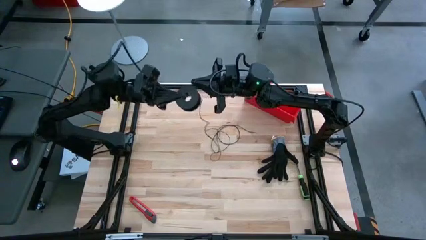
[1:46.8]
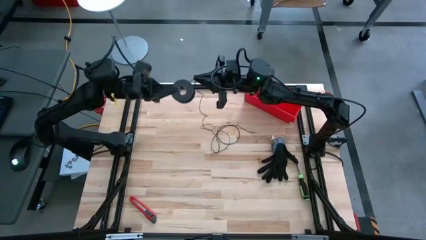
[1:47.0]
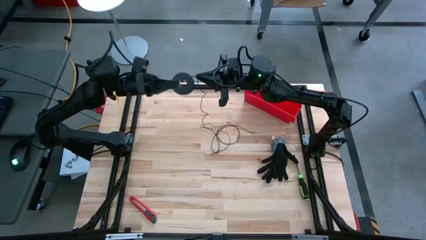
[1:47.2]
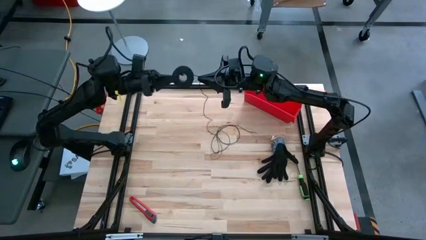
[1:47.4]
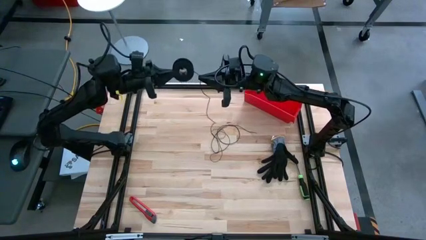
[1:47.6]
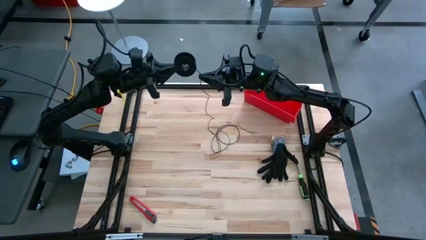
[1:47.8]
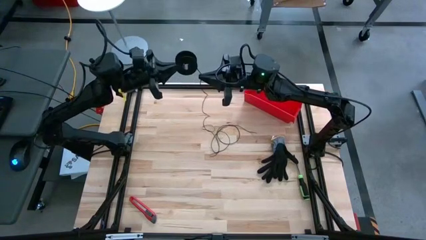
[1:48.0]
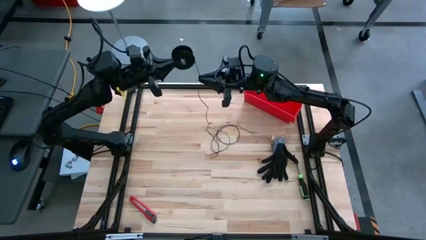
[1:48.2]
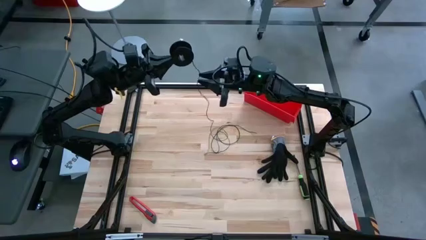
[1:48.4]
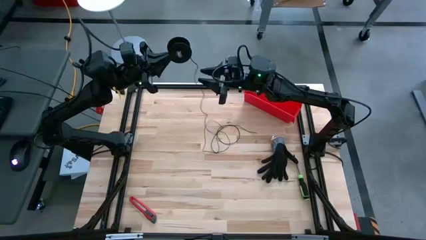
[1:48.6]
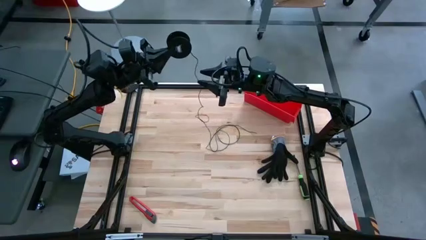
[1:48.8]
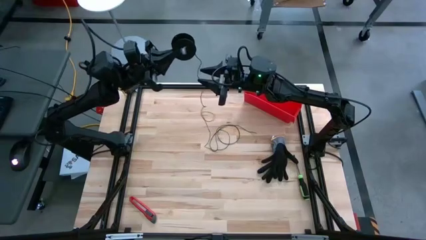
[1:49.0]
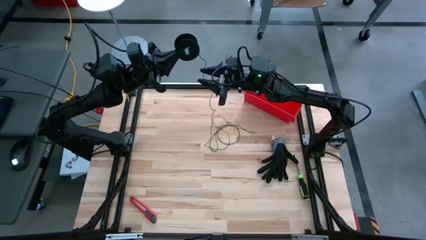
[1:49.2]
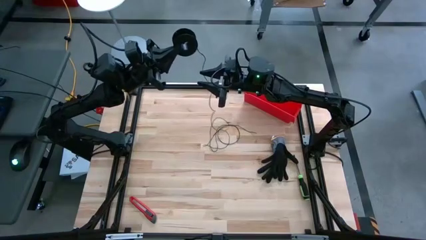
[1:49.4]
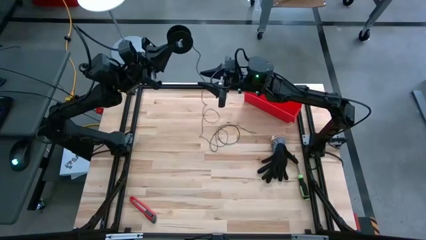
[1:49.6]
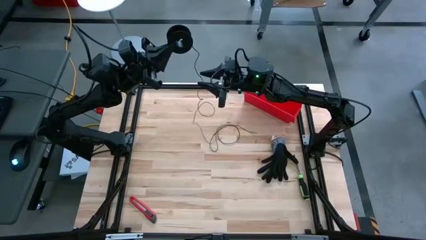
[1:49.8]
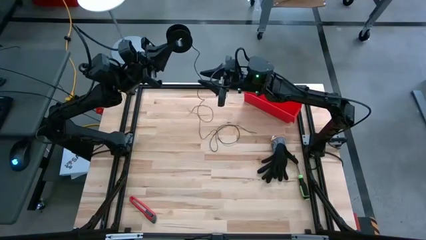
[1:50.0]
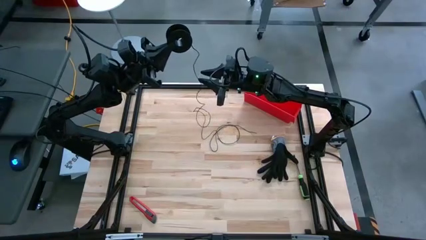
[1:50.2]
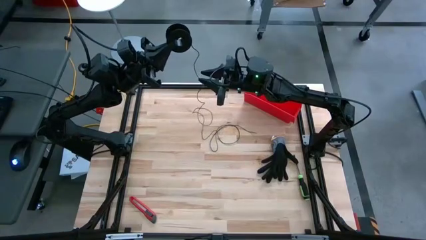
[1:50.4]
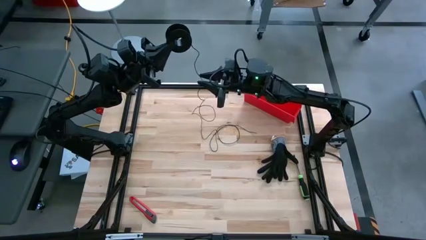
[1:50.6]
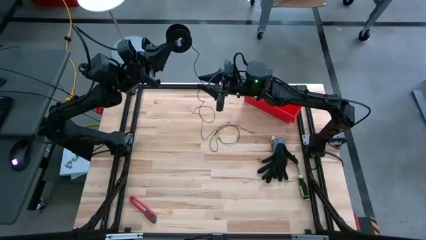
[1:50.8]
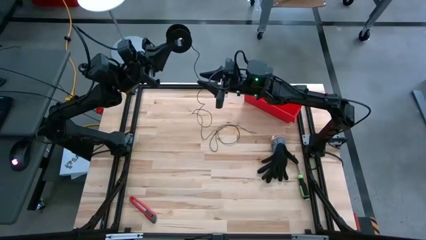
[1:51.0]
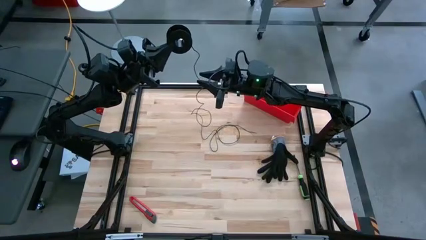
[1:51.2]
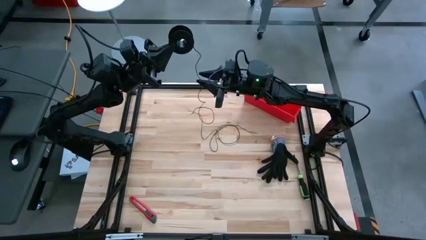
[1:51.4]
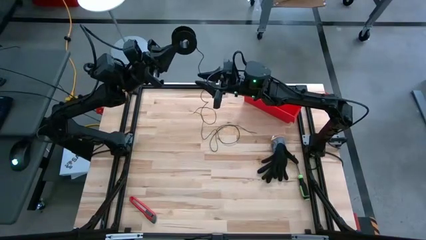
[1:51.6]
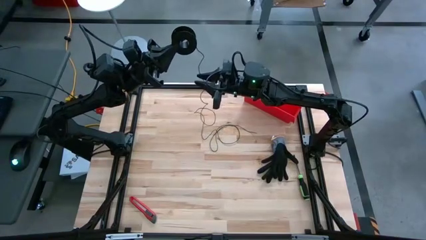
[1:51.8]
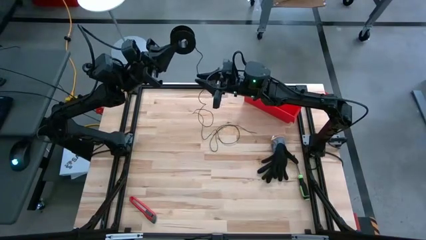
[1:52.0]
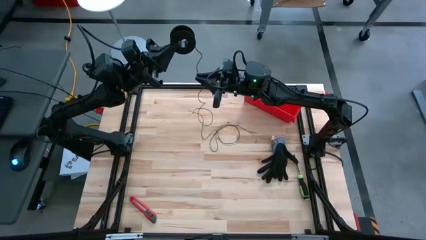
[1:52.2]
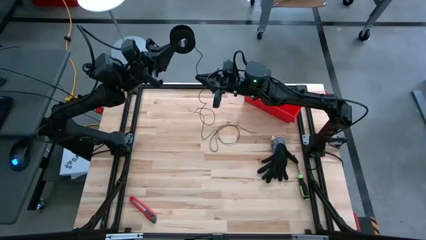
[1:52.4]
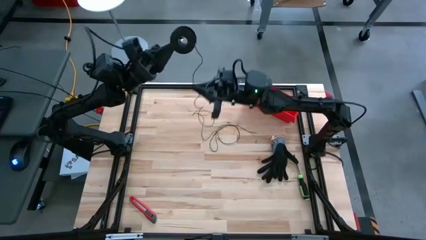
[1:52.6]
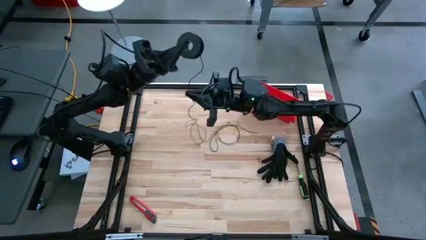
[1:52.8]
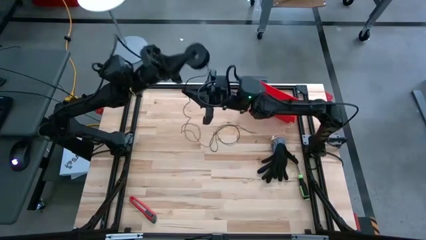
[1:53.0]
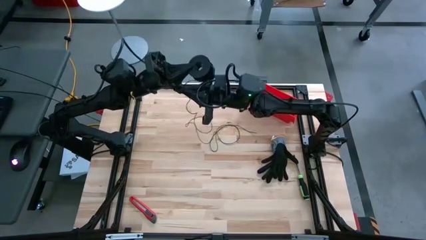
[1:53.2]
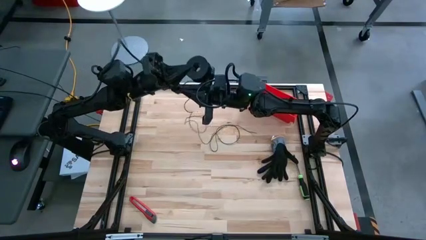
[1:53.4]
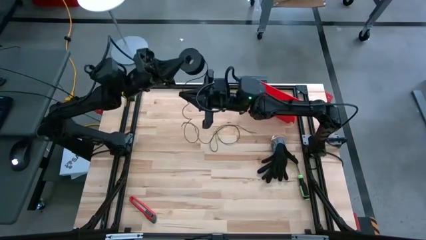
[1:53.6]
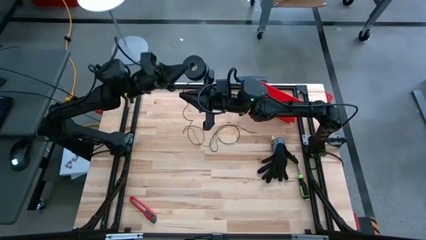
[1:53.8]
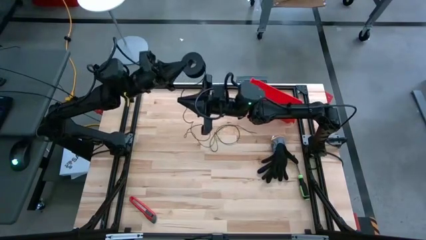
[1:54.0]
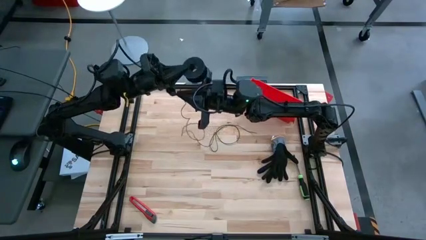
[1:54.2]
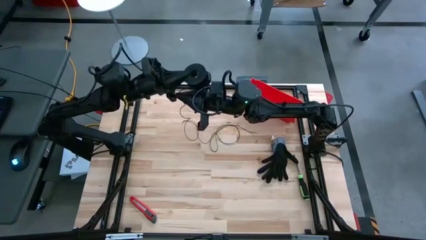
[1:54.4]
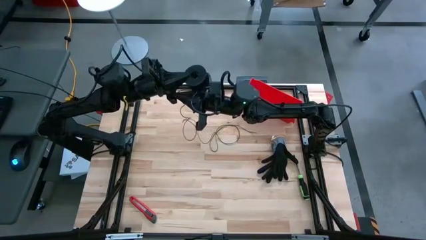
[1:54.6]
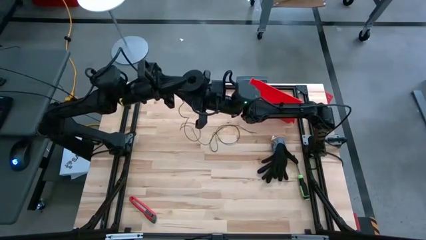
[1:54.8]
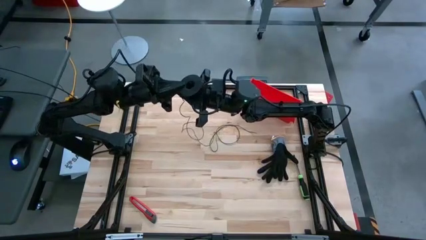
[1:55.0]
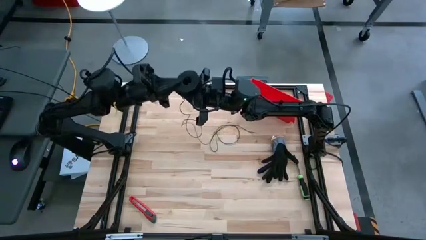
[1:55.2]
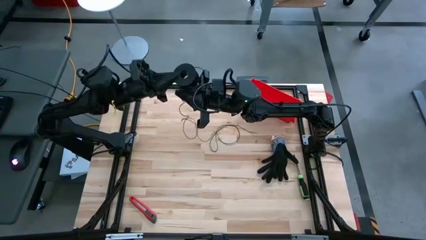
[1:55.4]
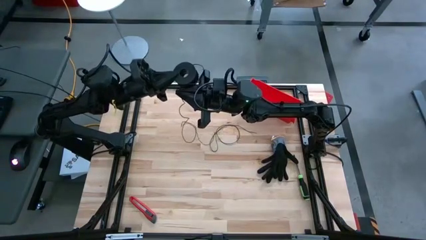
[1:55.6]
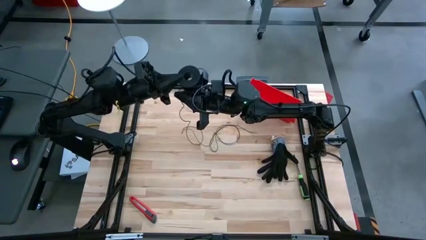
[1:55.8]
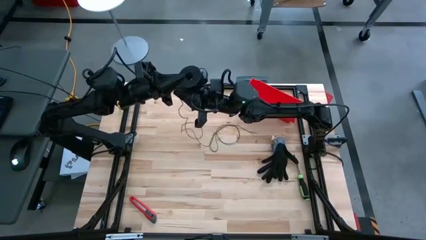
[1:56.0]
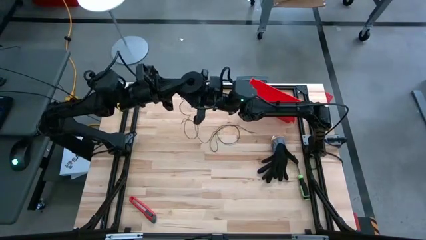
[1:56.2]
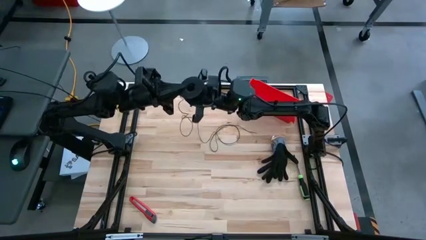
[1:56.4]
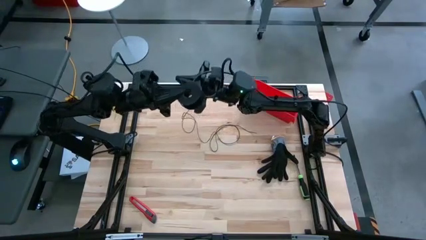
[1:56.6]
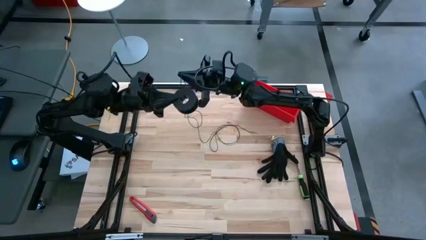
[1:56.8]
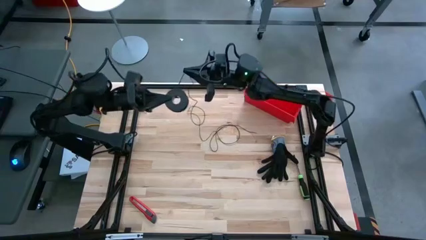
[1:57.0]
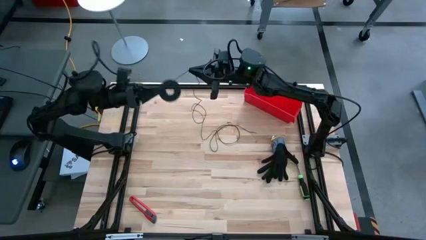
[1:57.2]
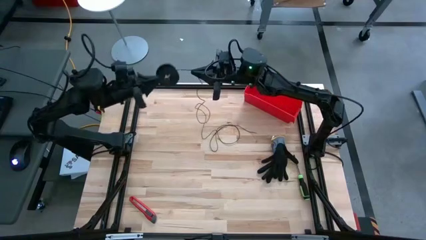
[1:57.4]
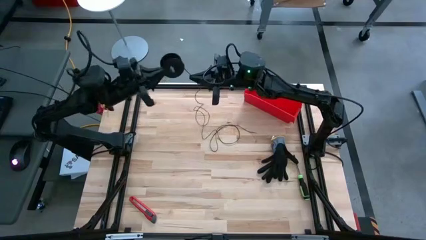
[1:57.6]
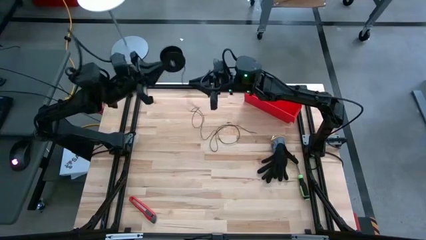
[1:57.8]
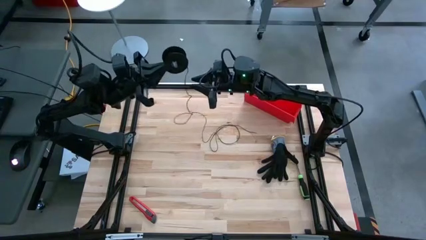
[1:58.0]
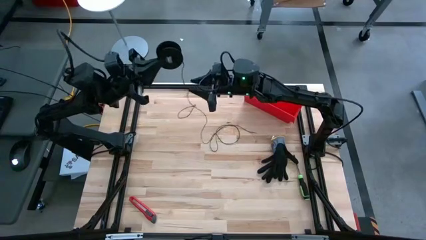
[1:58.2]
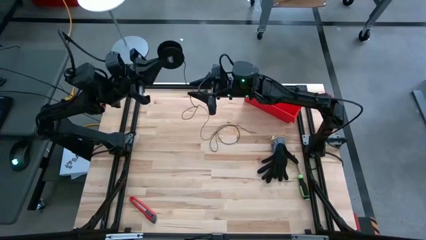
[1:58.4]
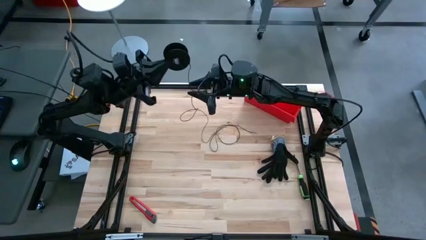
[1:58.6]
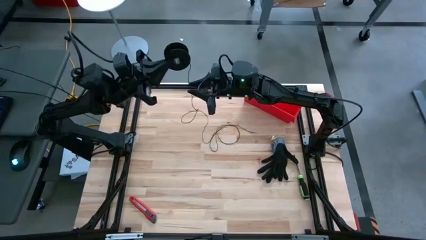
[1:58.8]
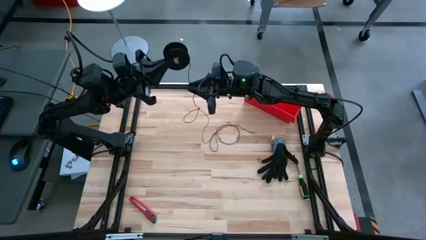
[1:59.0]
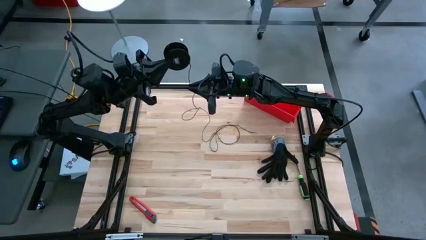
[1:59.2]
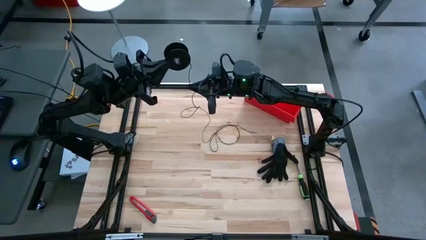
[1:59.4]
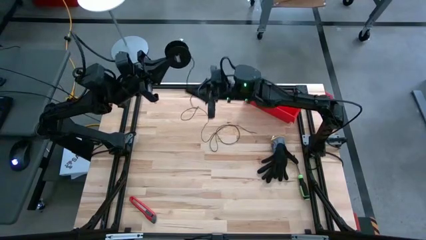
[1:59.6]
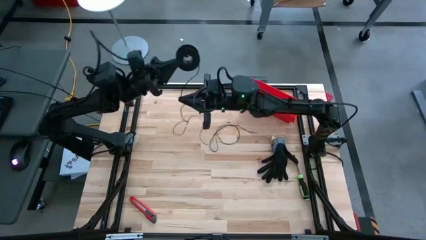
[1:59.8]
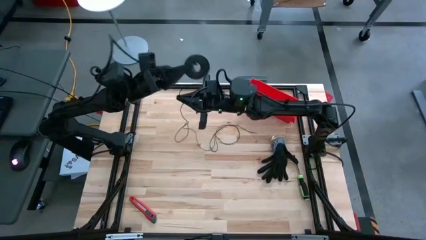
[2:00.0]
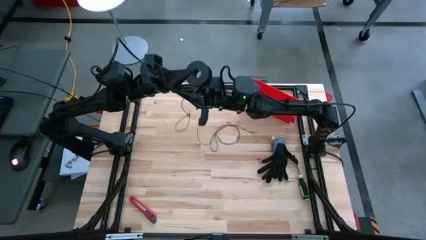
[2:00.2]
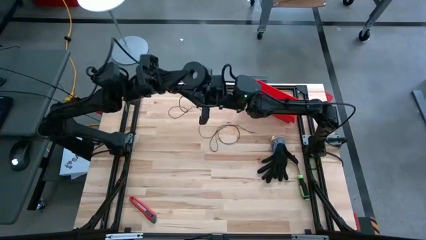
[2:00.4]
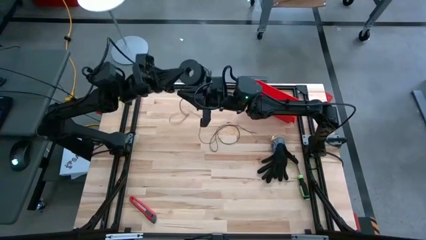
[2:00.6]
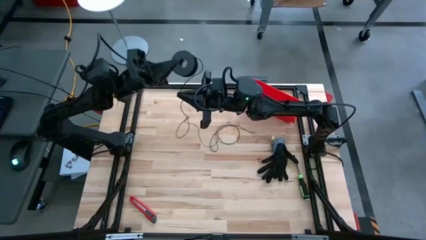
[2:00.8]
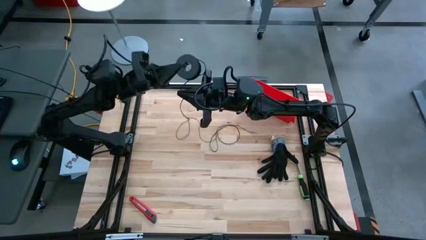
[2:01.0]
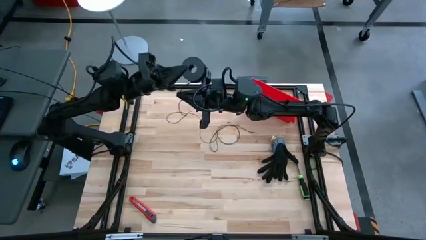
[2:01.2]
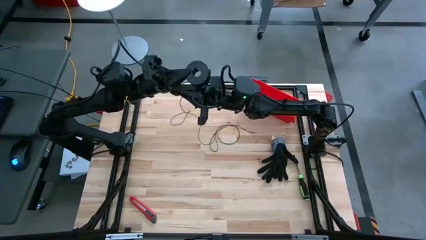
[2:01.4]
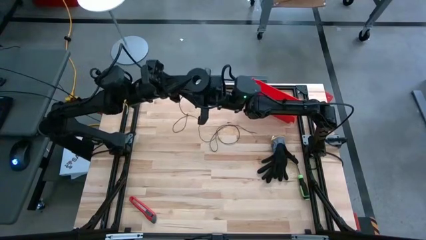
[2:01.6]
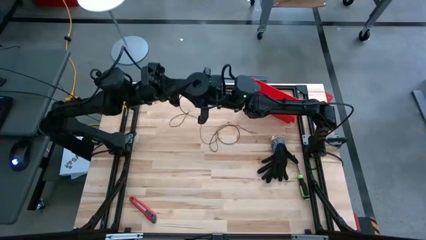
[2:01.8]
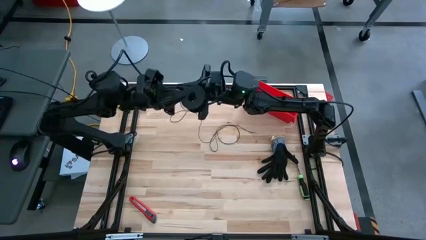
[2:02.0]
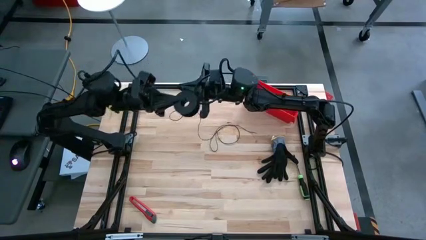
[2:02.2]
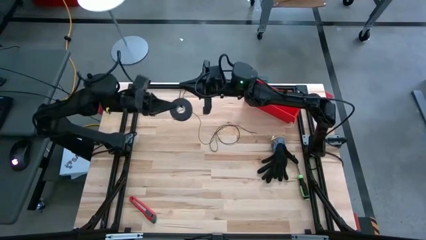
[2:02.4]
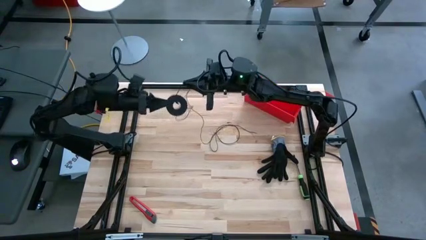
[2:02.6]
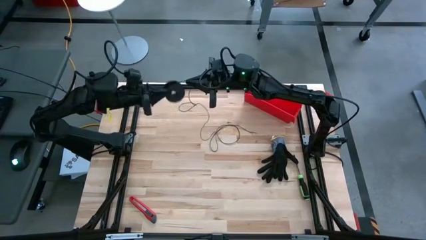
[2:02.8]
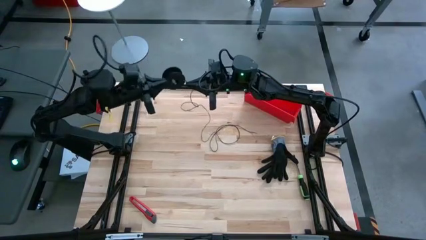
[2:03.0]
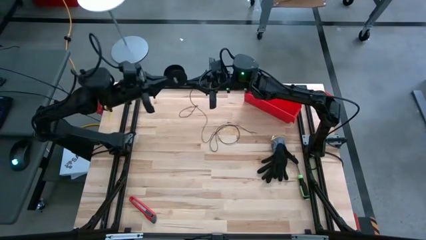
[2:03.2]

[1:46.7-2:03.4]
Task: Coil cords
Coil the black wire on the spool
